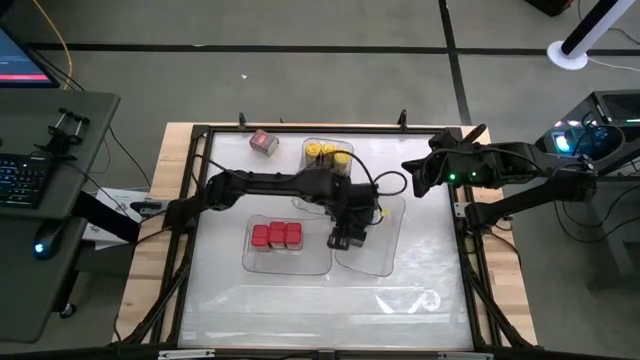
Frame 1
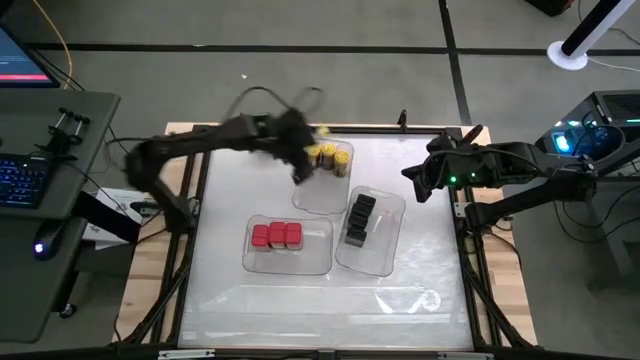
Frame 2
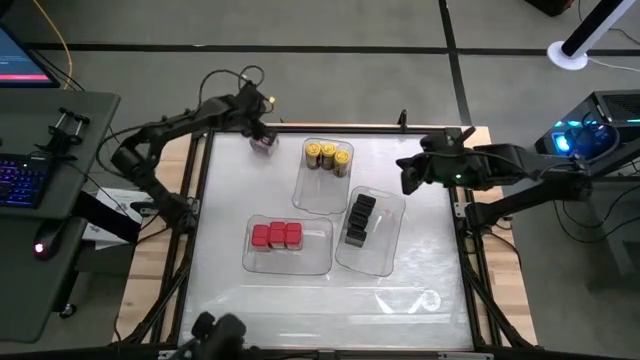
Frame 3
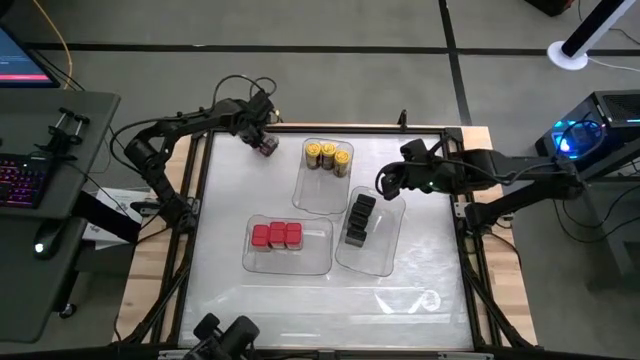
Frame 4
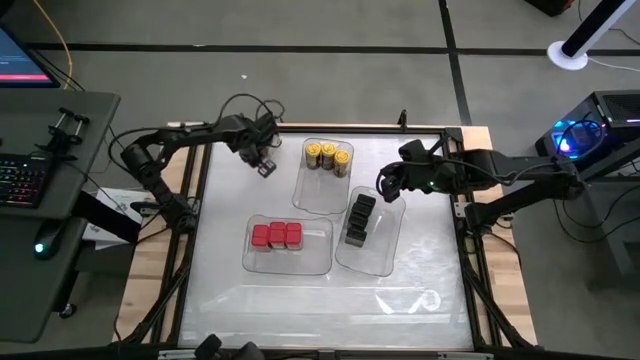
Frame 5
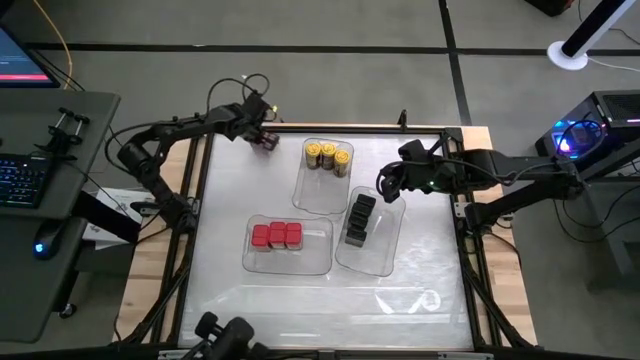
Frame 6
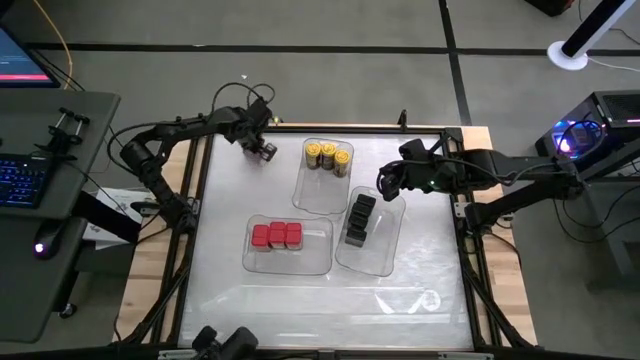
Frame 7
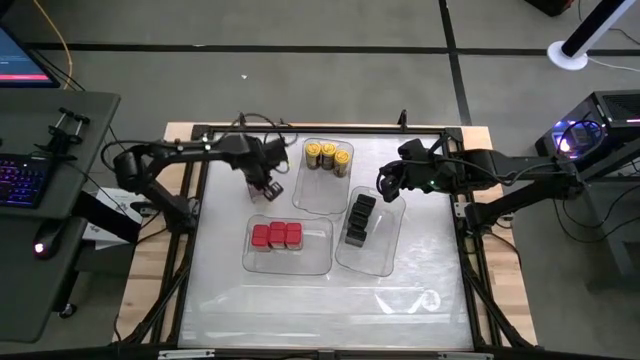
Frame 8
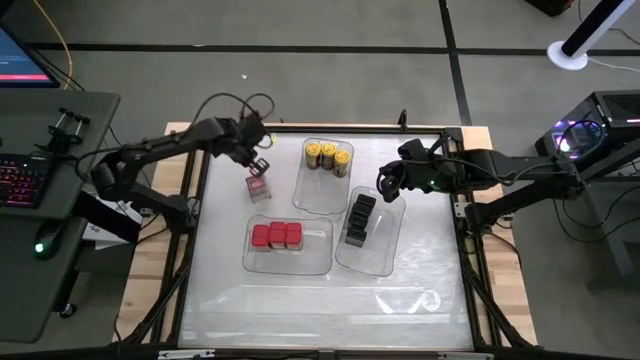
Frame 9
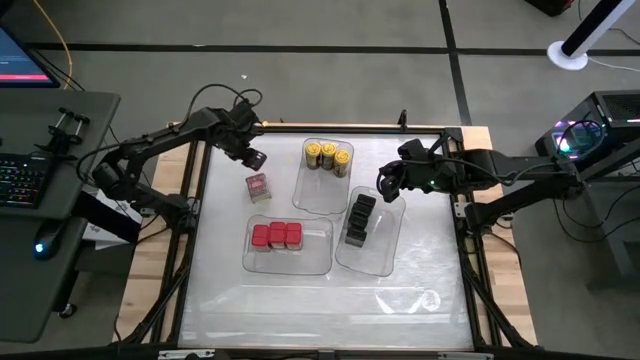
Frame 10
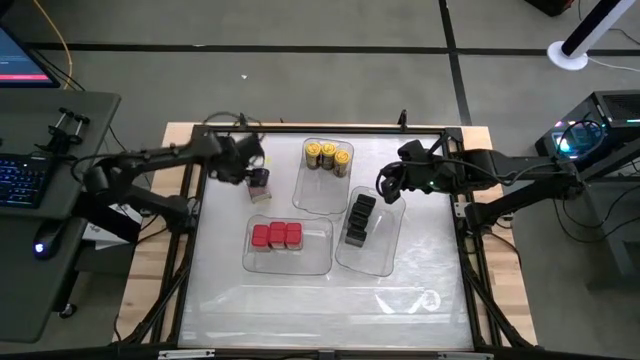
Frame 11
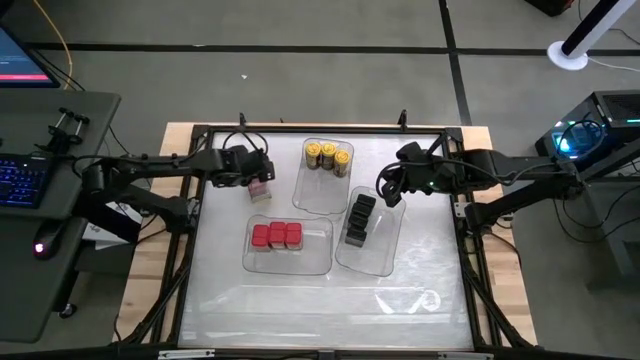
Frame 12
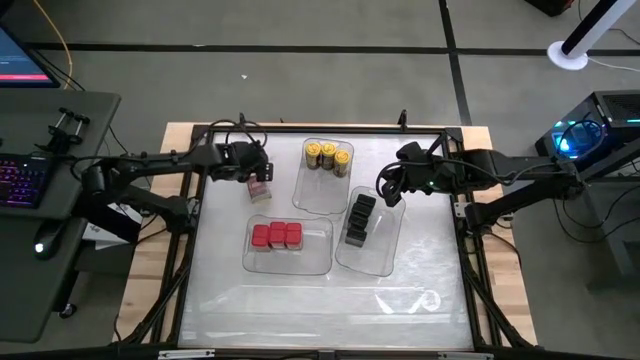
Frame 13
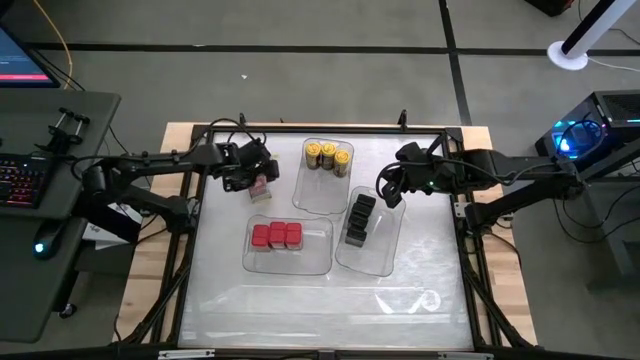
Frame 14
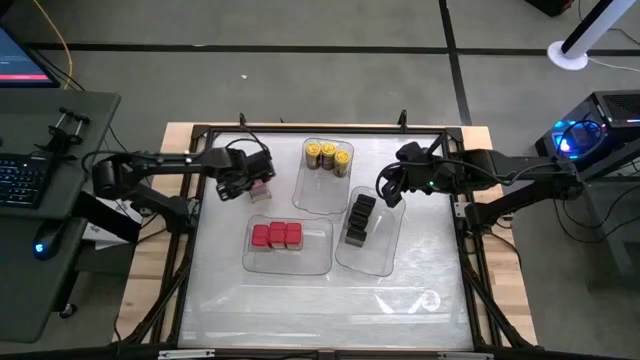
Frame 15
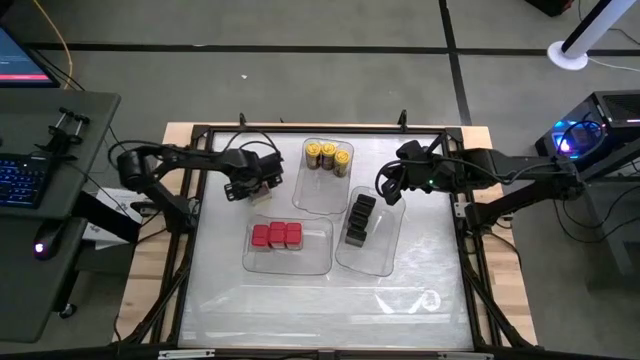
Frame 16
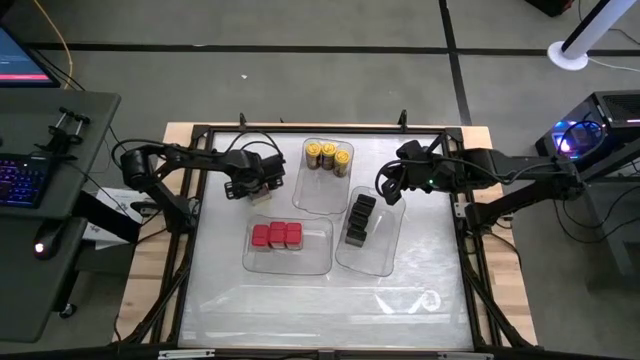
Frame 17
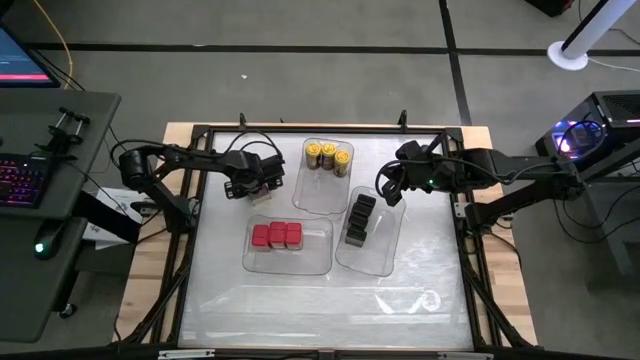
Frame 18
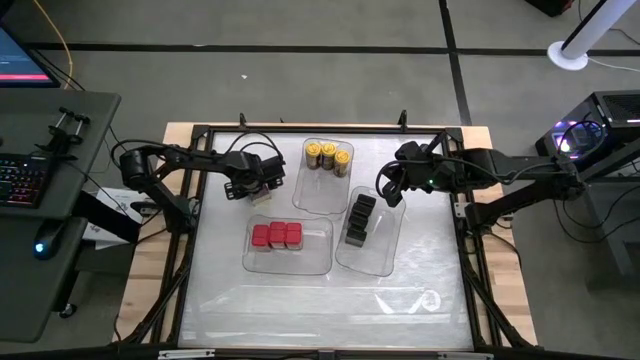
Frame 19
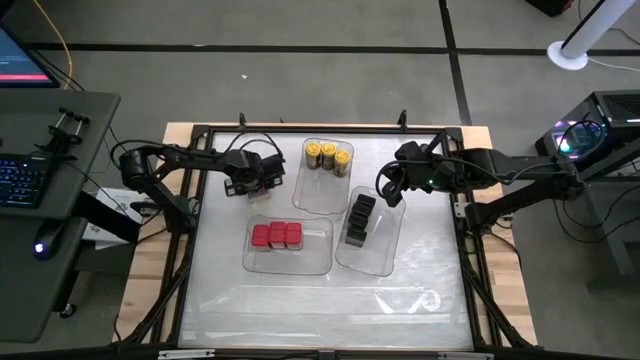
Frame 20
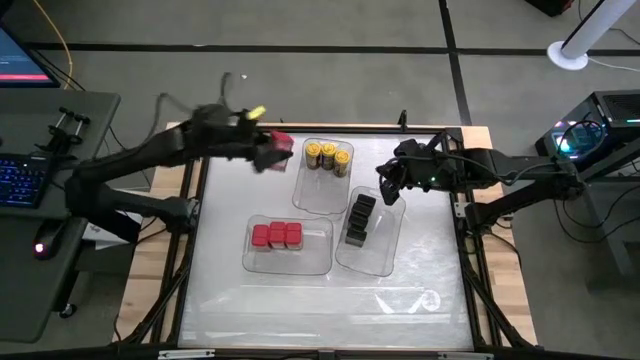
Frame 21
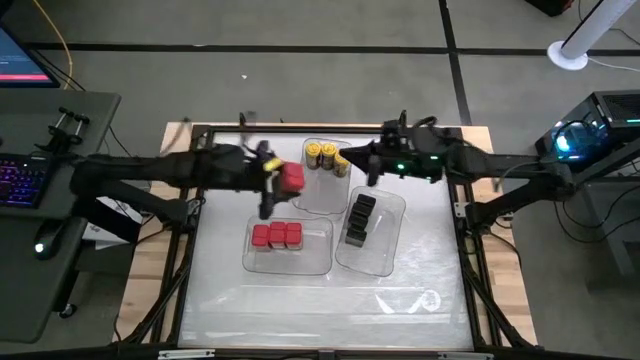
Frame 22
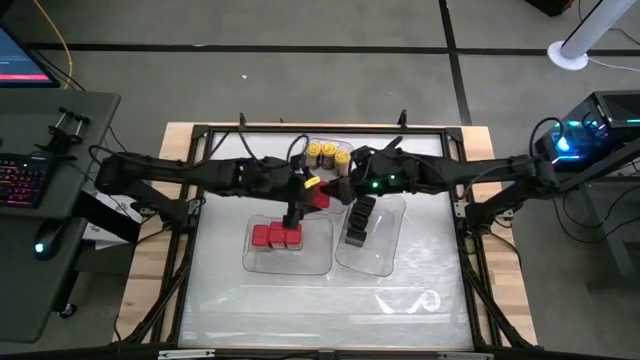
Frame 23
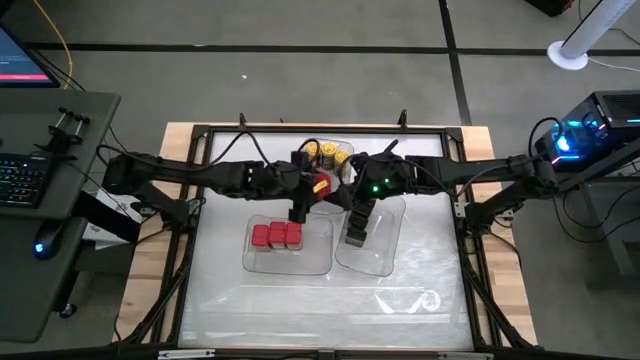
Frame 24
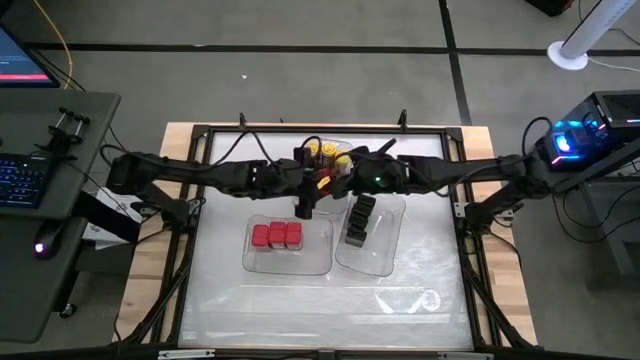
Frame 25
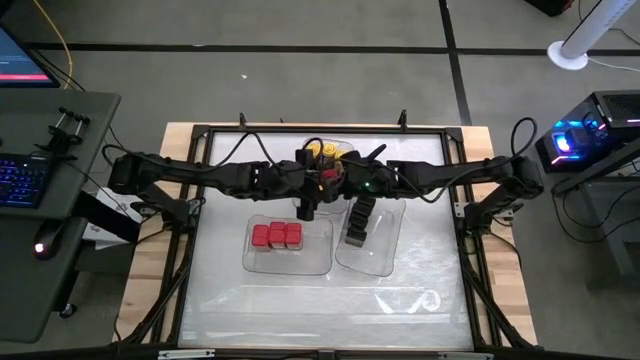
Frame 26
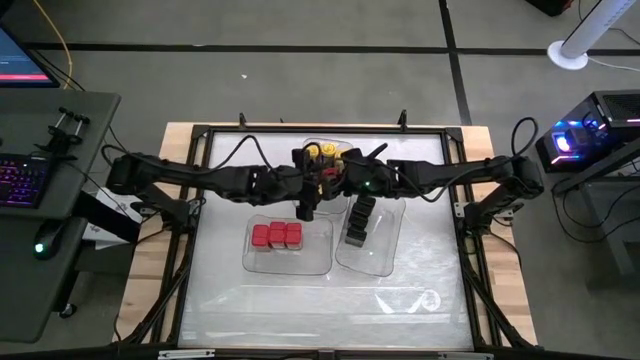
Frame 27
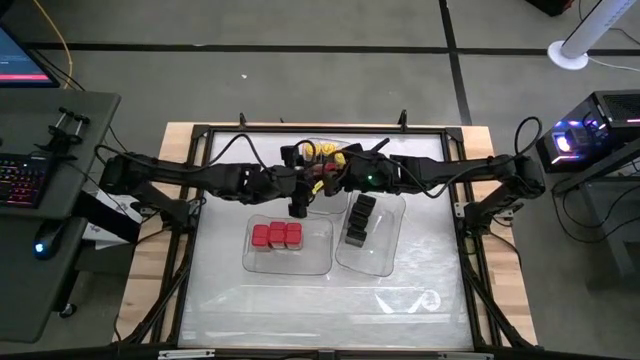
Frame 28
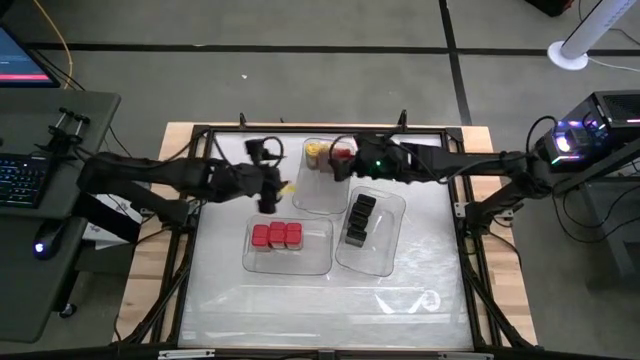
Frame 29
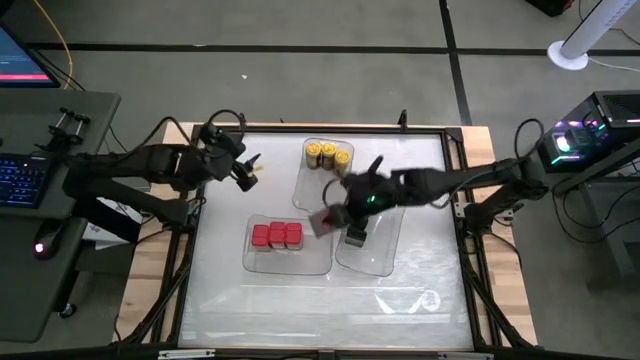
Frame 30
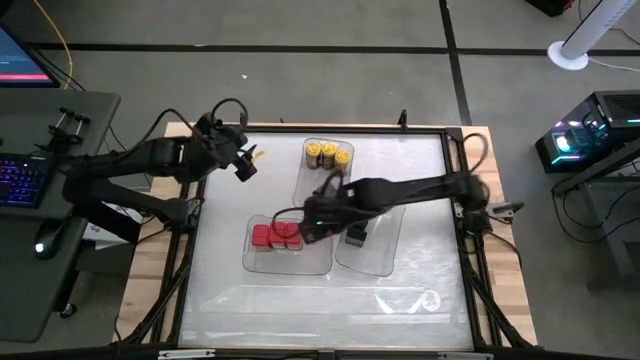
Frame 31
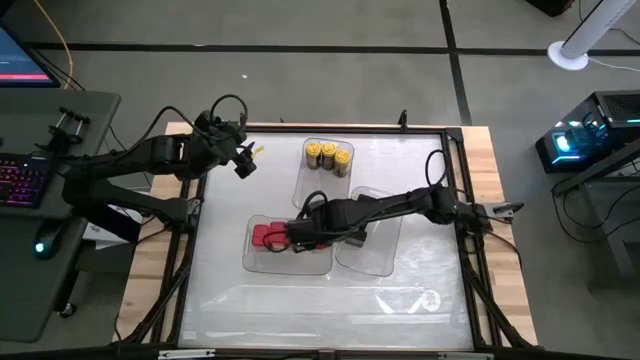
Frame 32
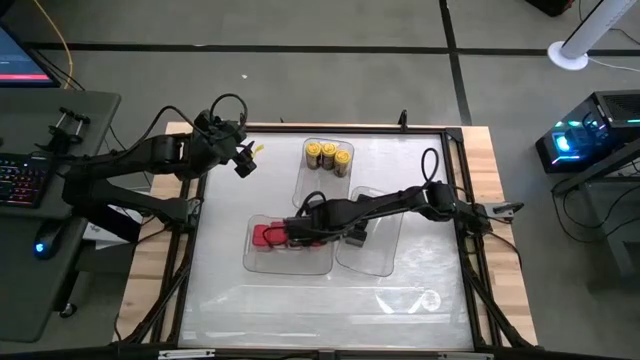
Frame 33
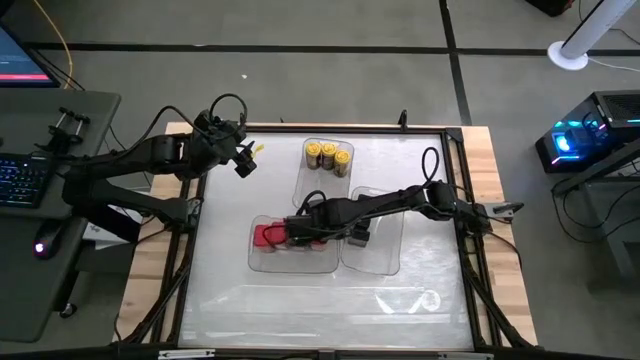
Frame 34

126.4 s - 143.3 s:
Task: Sort spices by type
Put the red seasoning can into the left transparent bin

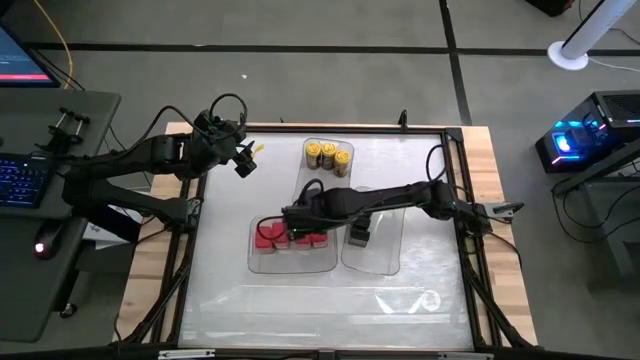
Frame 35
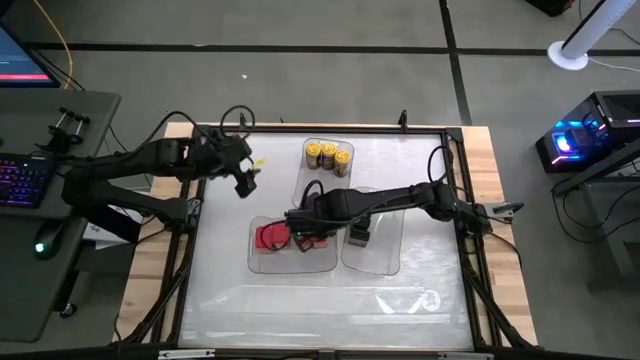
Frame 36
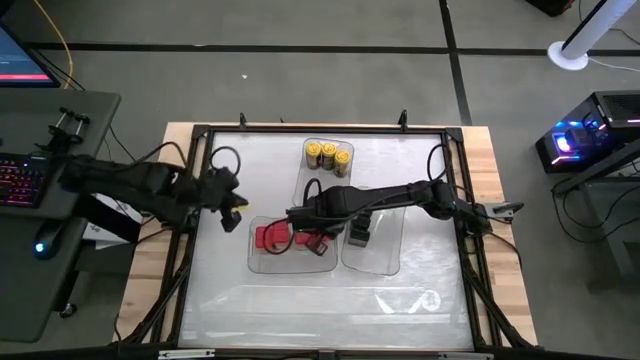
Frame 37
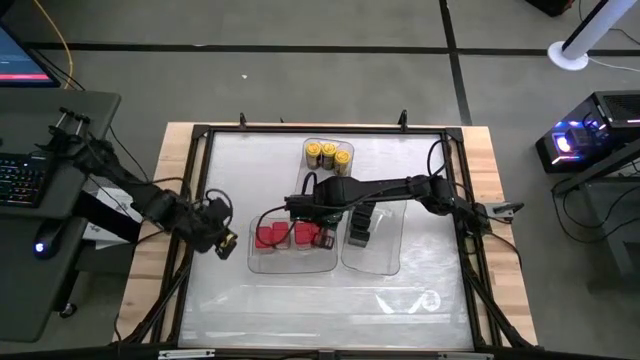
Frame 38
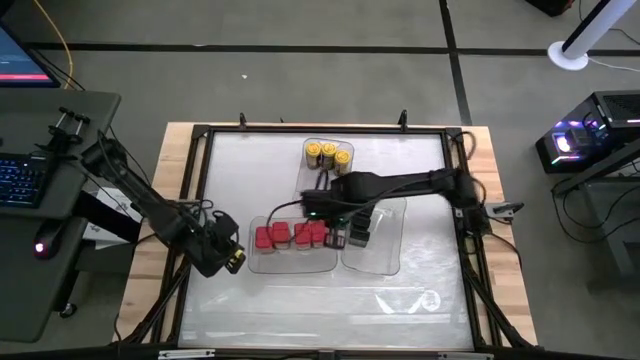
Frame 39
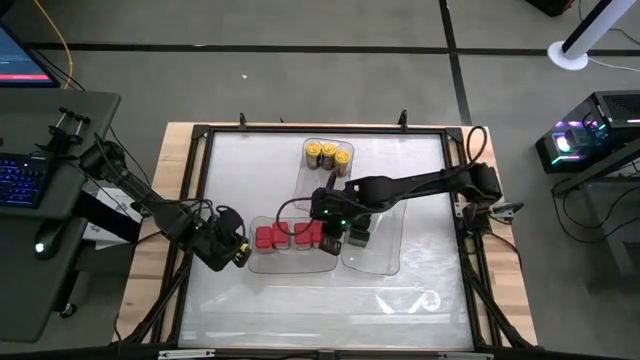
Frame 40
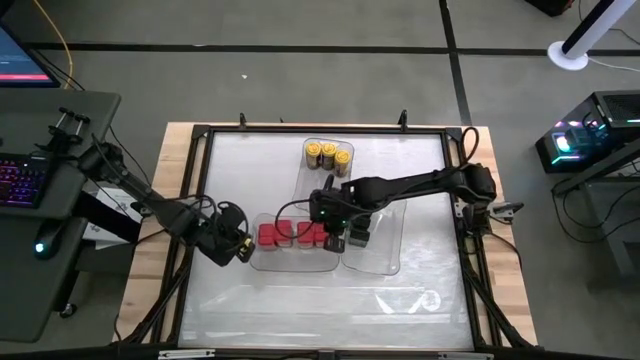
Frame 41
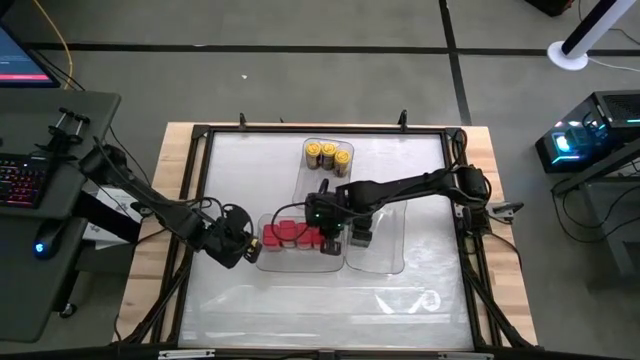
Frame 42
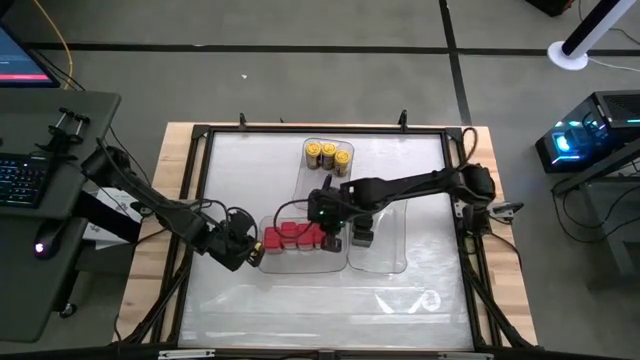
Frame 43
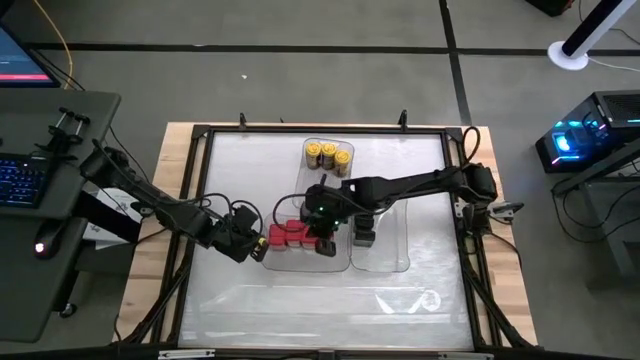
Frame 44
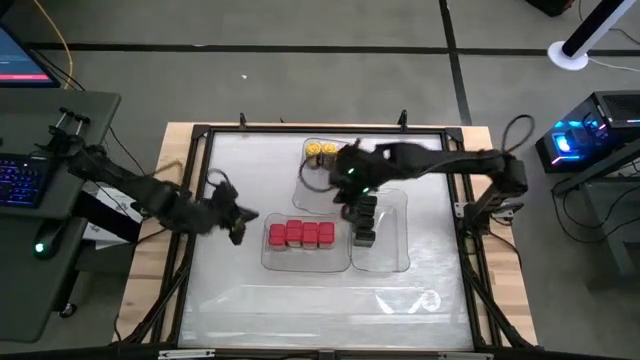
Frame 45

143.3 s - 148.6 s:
Adjust the left transparent bin
